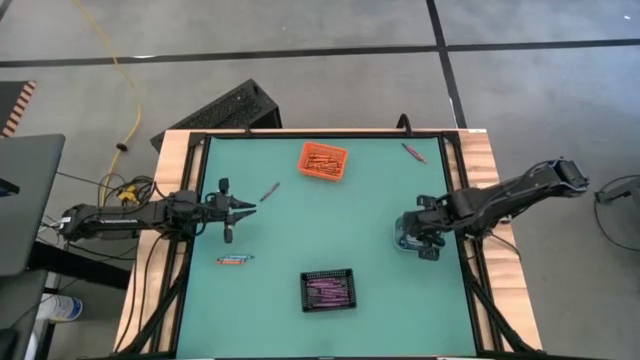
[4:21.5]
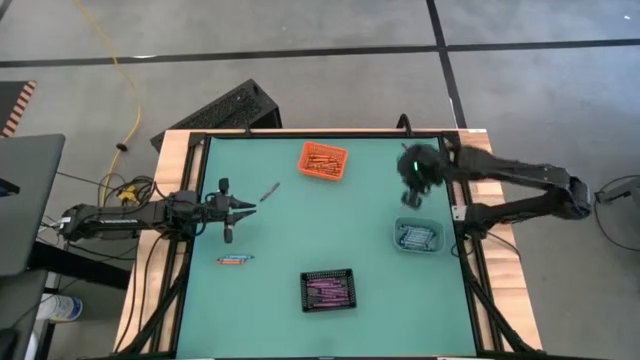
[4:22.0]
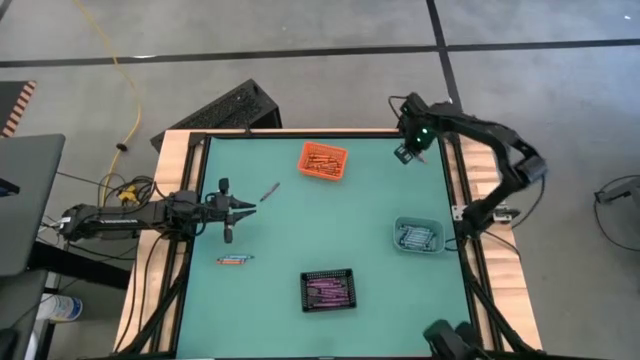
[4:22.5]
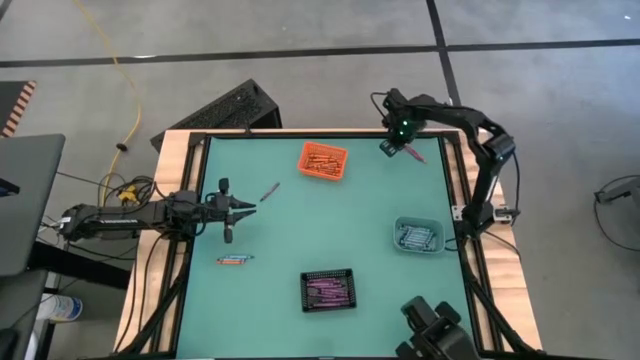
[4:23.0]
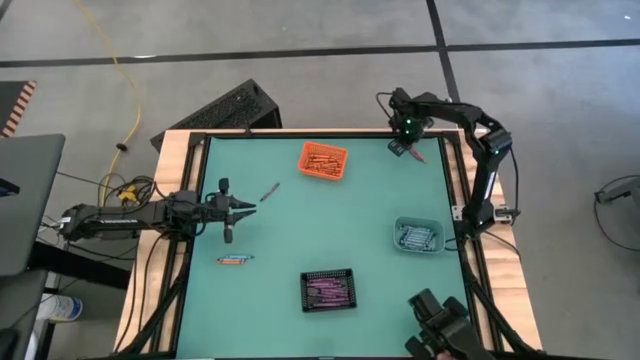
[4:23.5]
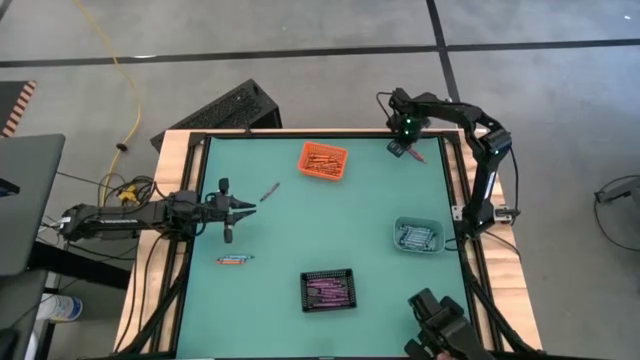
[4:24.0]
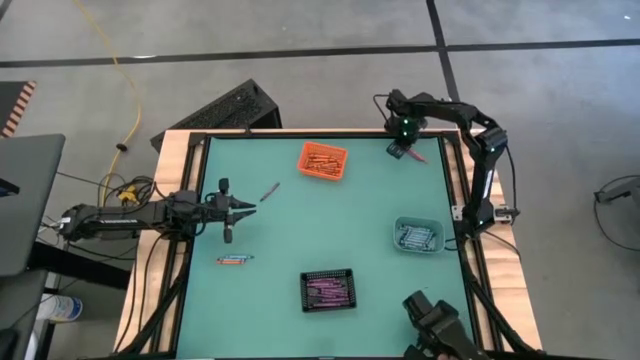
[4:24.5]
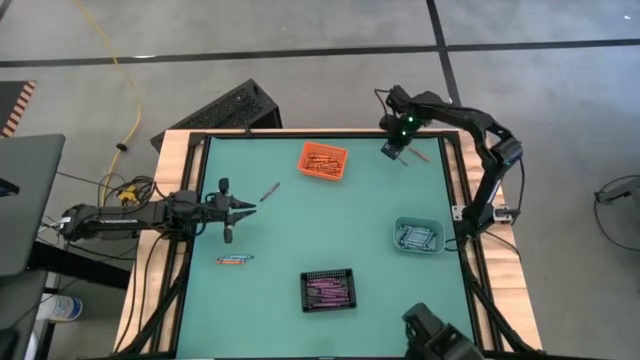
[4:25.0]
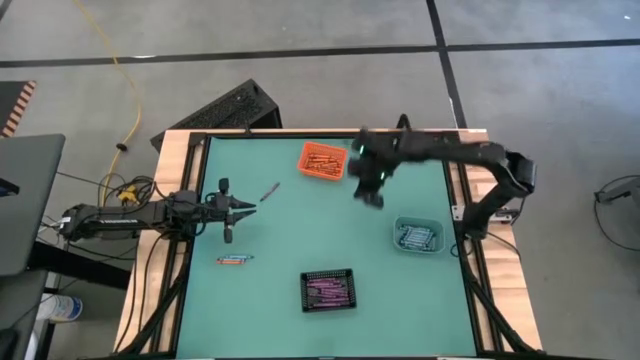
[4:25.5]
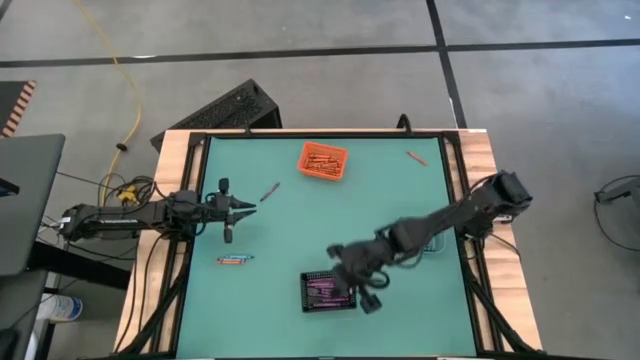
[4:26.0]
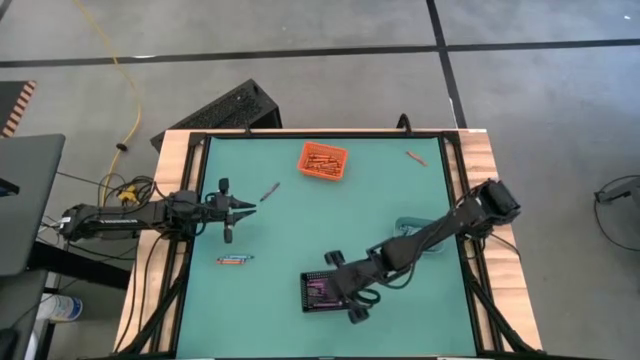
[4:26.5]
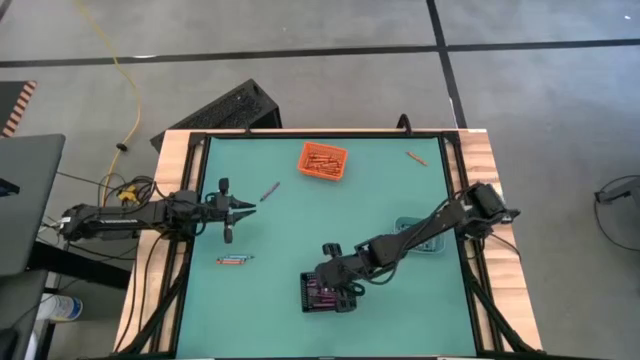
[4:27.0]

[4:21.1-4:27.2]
Task: Sort crayons
Put the purple crayon into the black bin

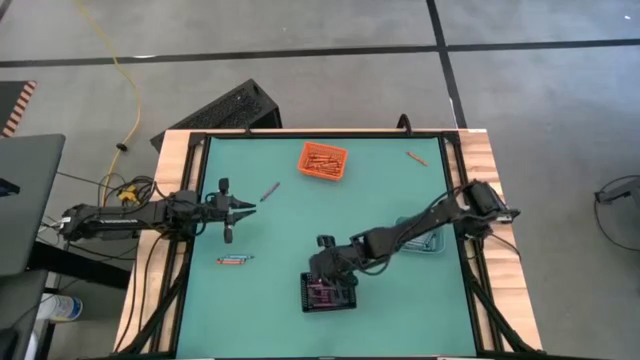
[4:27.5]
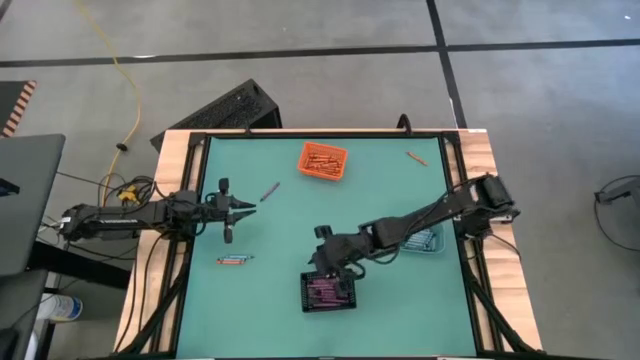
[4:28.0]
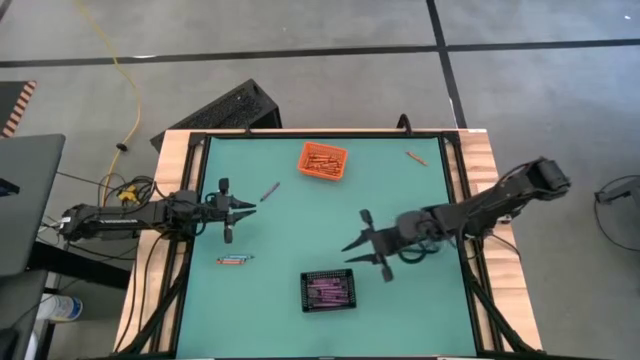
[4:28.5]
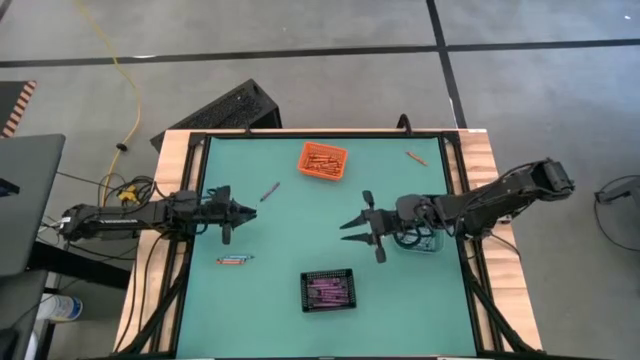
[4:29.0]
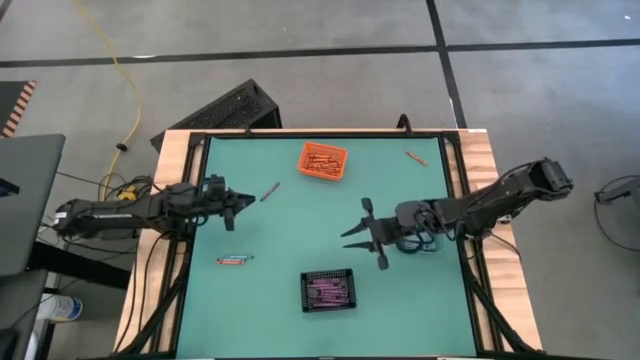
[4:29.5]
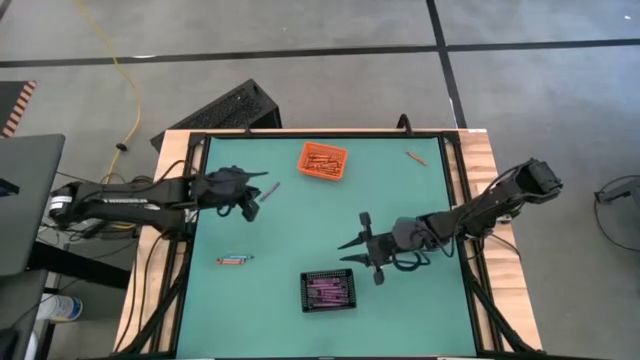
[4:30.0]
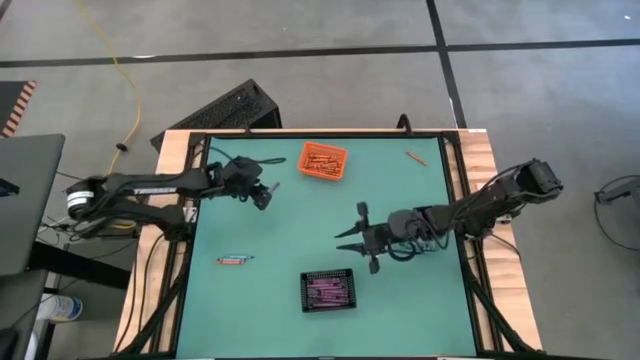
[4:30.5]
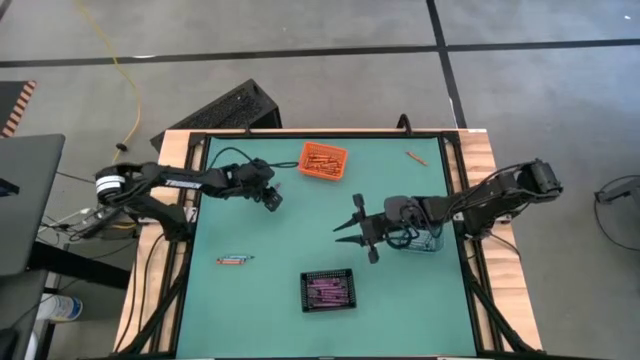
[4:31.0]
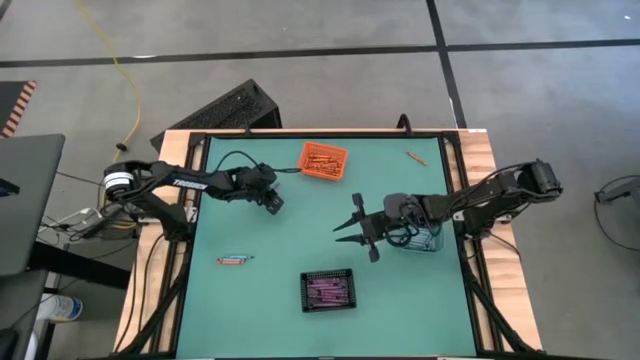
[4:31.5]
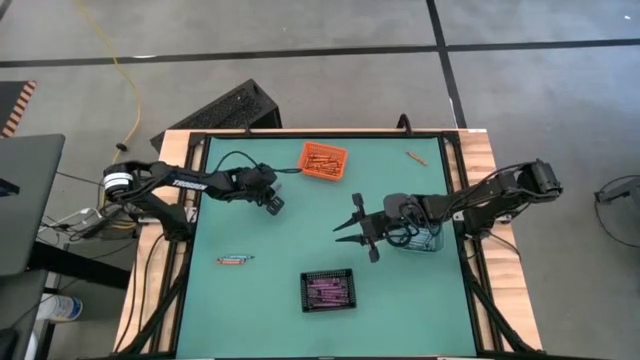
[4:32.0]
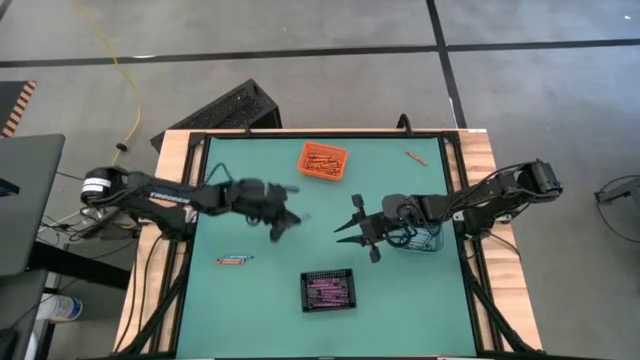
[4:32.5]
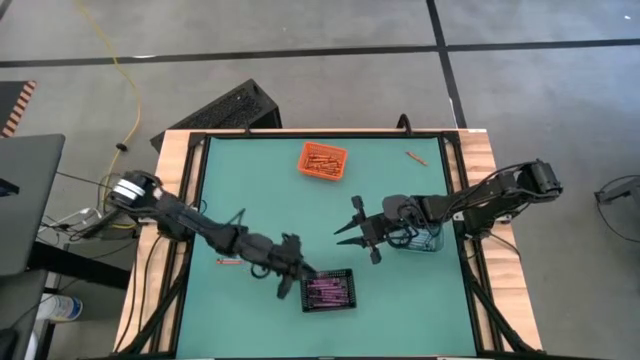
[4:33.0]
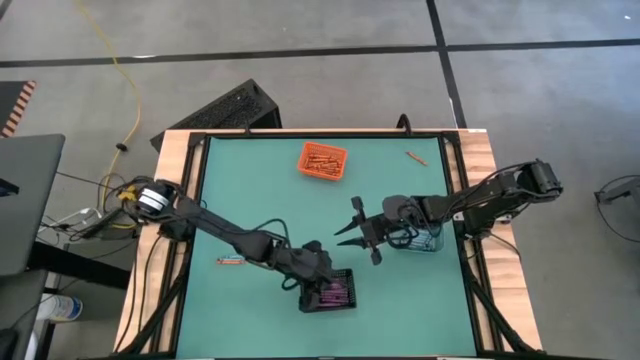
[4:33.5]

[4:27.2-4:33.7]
Put the purple crayon into the black bin

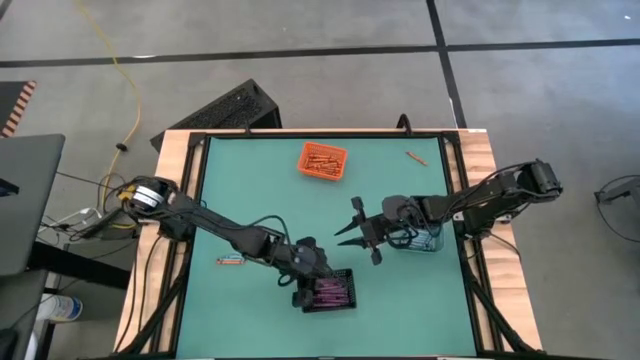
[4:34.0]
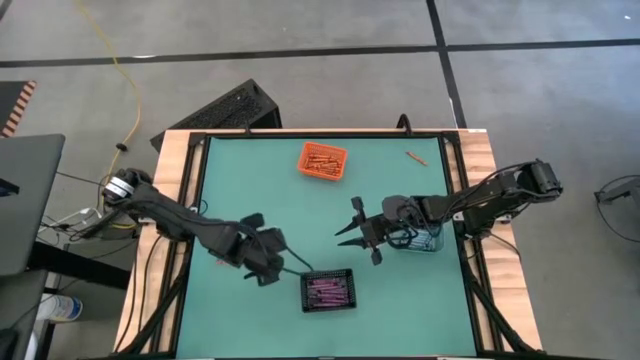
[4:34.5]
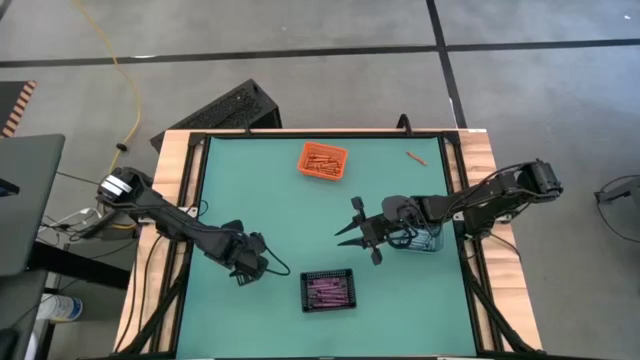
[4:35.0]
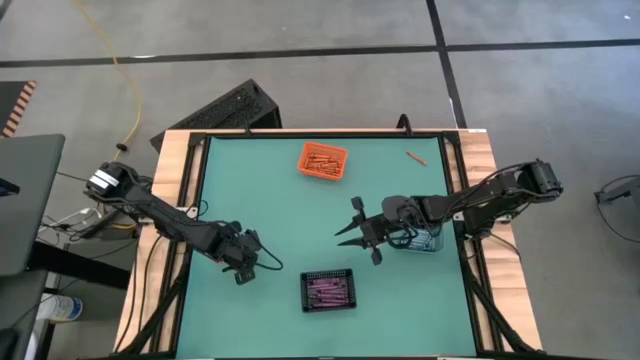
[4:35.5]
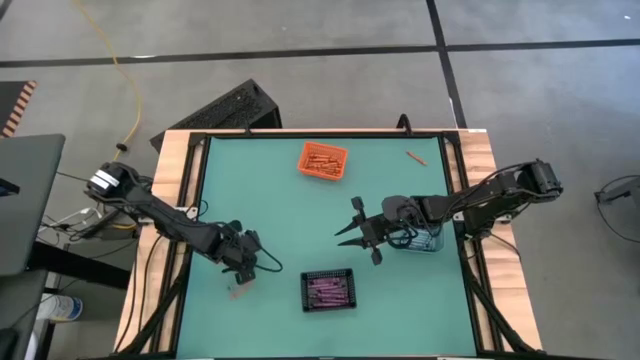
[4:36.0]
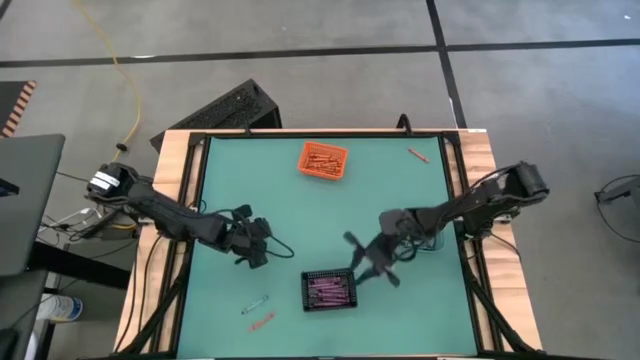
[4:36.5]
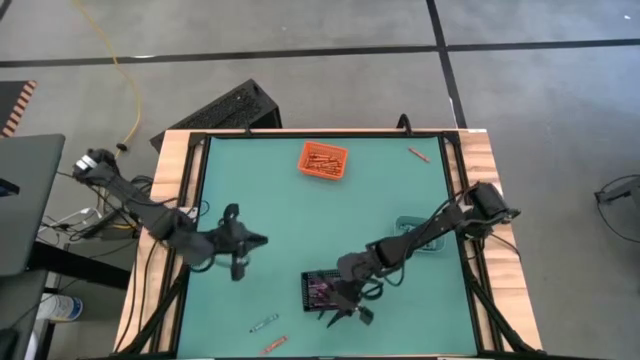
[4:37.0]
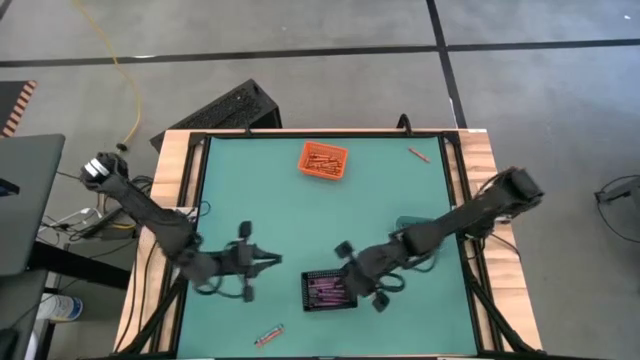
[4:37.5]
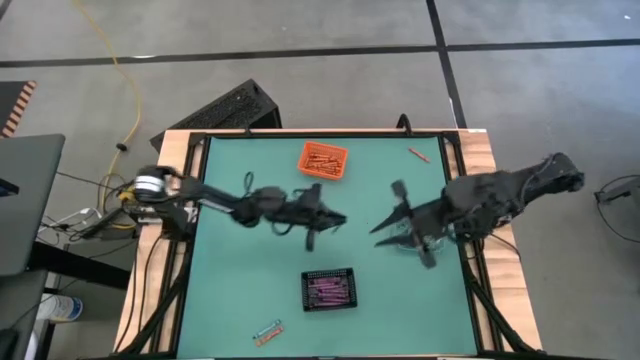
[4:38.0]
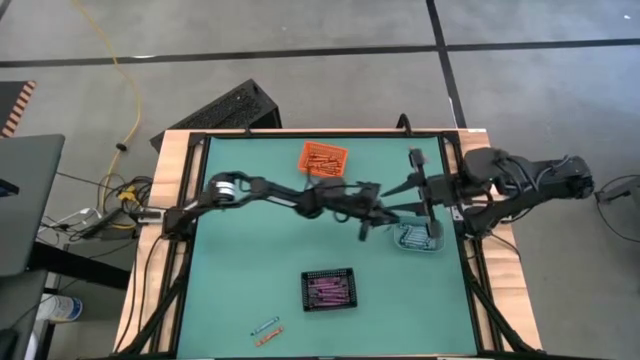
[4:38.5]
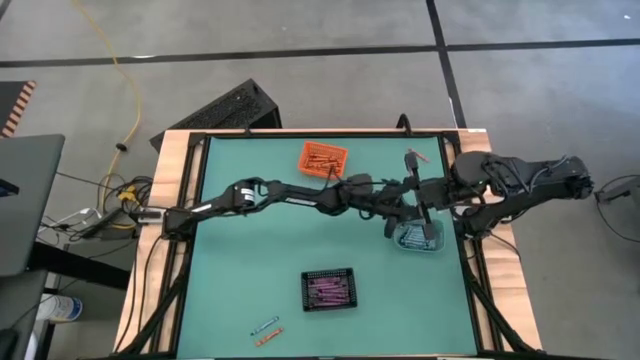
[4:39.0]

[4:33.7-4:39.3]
Put the blue crayon into the blue bin

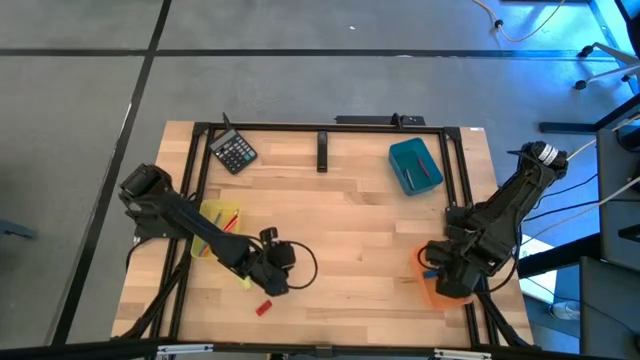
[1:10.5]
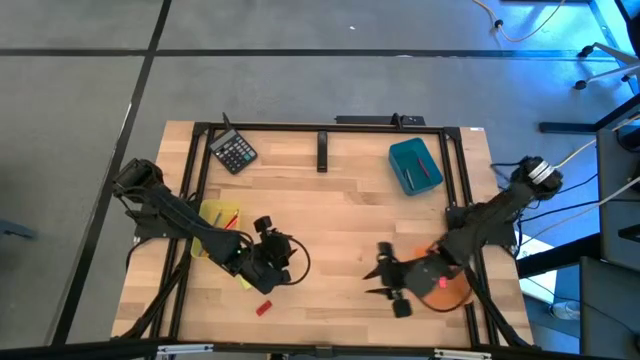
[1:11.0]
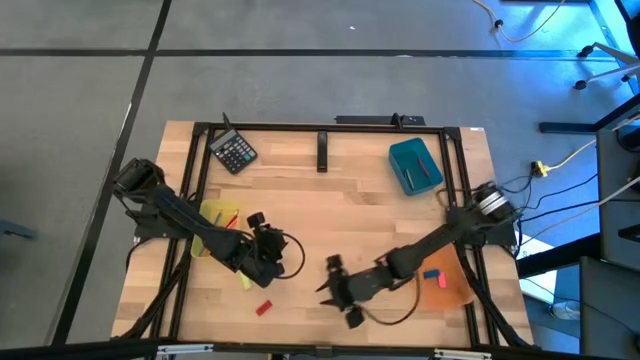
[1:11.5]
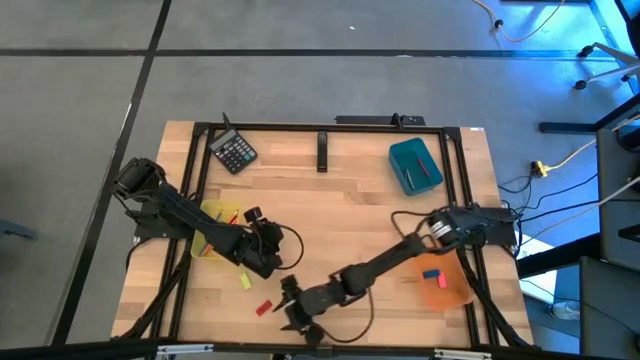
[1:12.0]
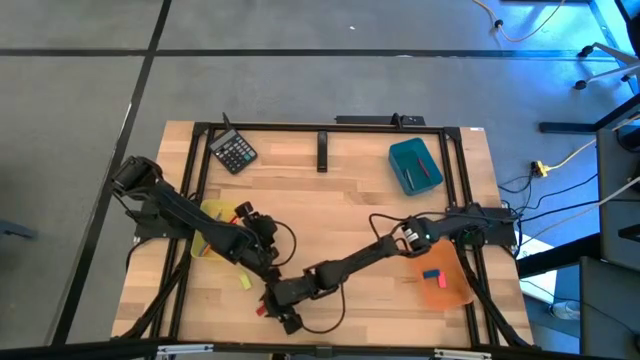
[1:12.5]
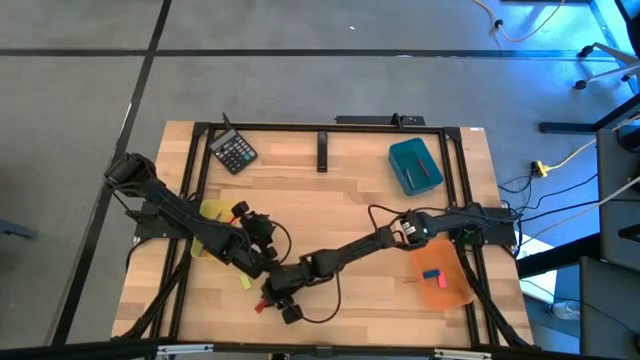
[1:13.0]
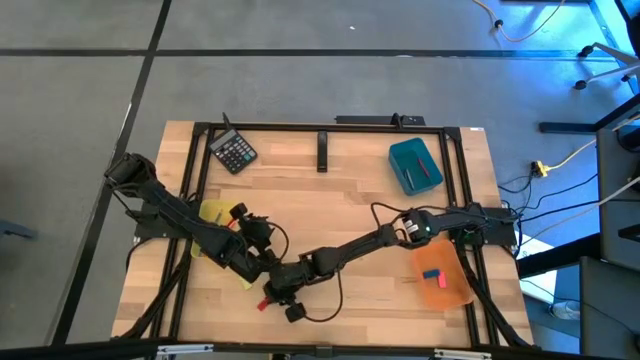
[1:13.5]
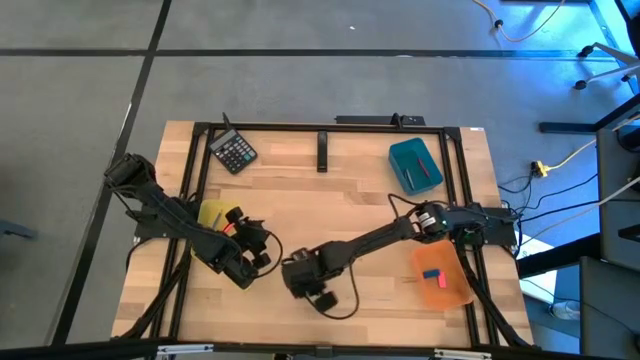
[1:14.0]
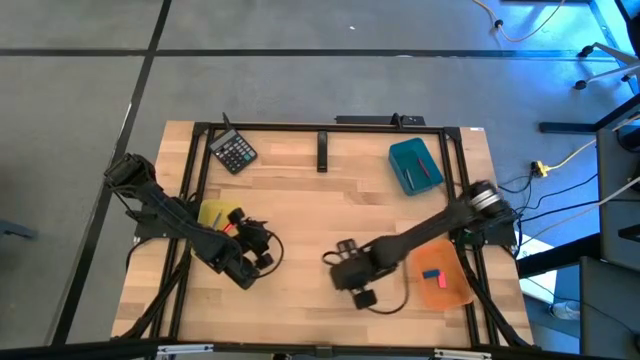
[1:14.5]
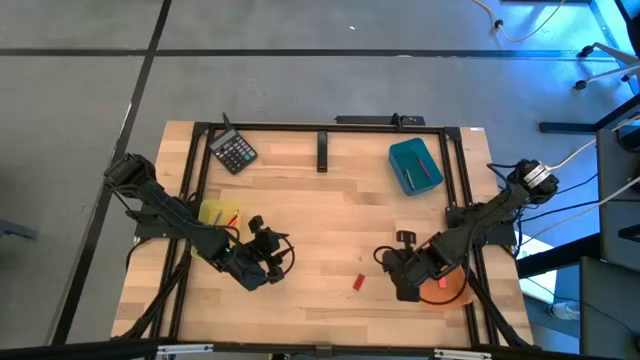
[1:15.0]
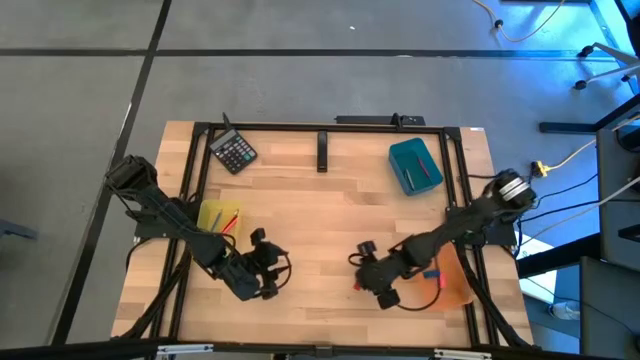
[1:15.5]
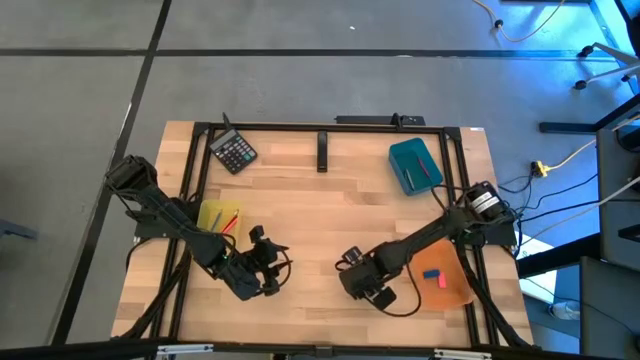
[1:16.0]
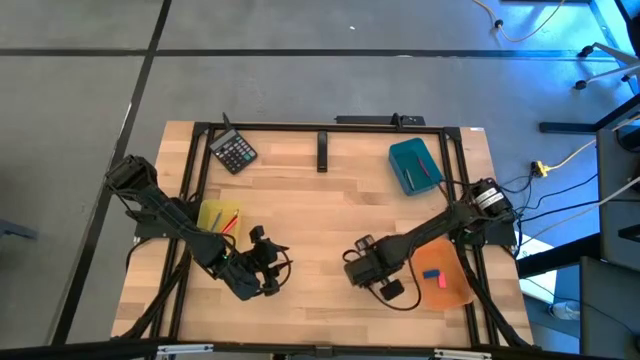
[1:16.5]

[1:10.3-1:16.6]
Task: Sort crayons/erasers/pens/pencils in bins
Put the red eraser into the orange bin
